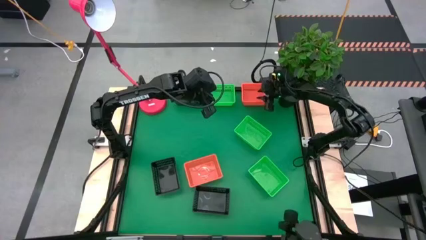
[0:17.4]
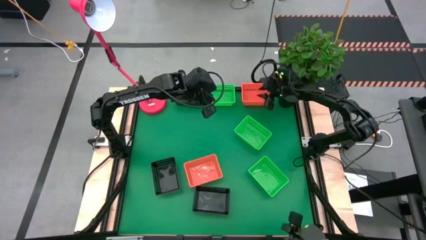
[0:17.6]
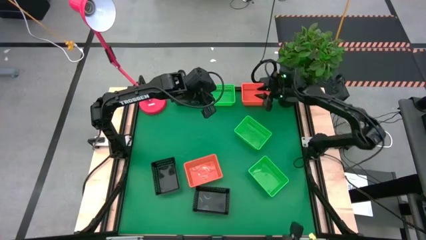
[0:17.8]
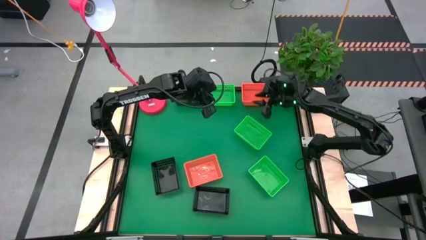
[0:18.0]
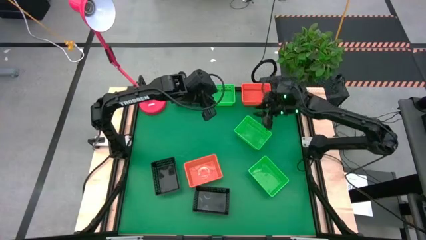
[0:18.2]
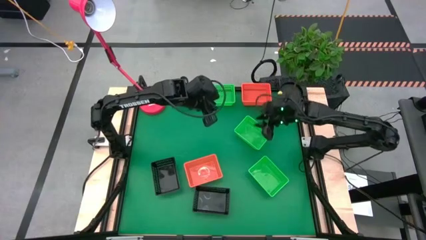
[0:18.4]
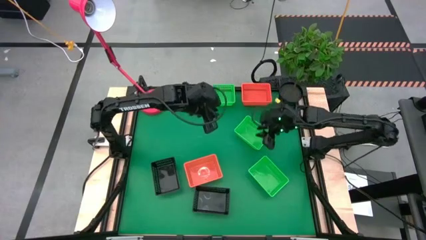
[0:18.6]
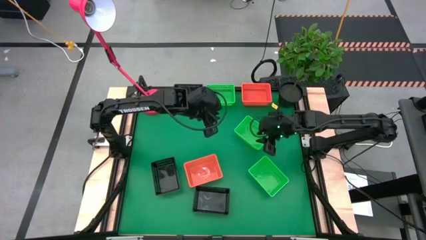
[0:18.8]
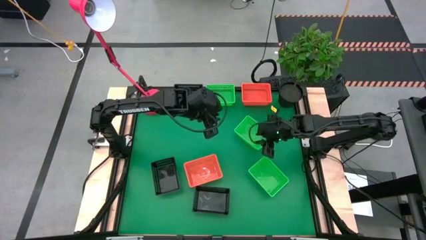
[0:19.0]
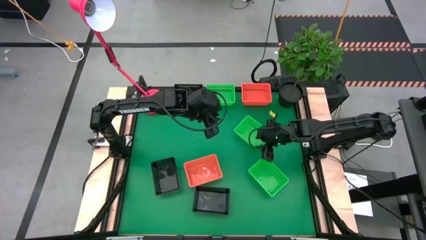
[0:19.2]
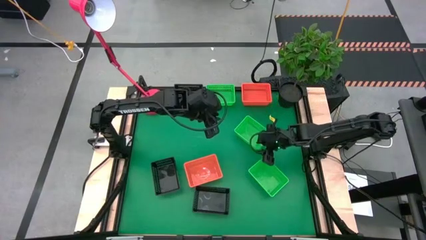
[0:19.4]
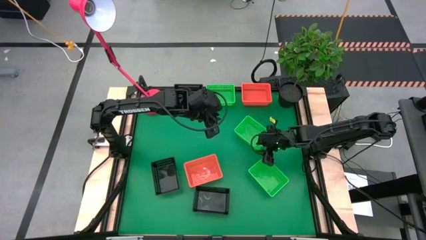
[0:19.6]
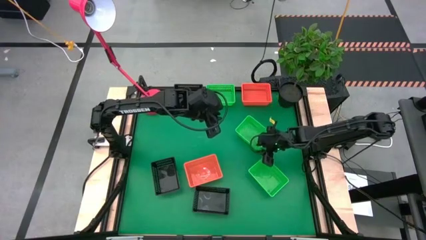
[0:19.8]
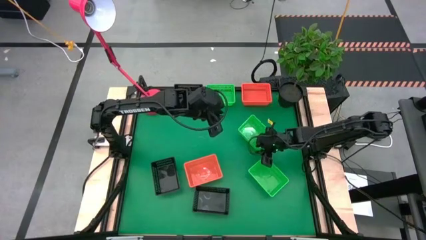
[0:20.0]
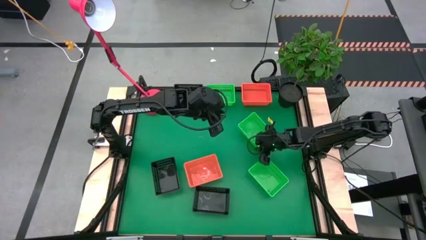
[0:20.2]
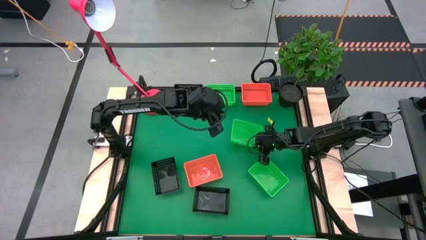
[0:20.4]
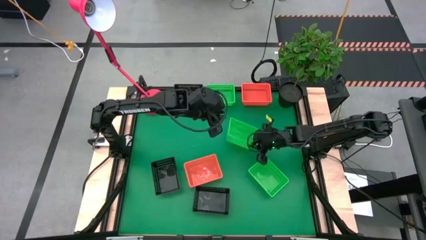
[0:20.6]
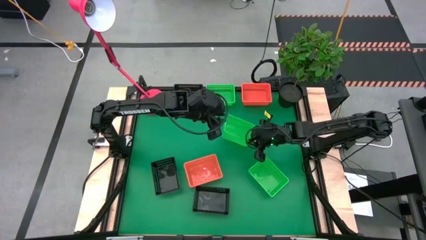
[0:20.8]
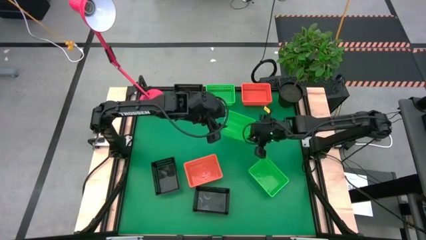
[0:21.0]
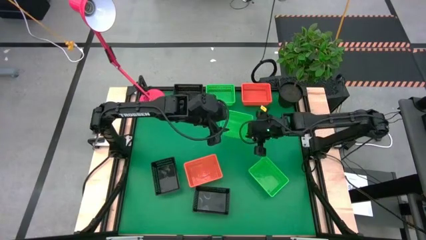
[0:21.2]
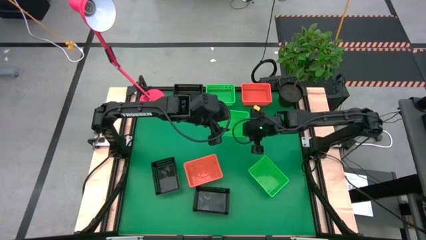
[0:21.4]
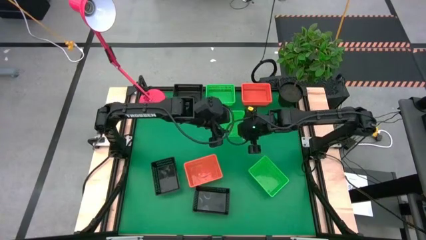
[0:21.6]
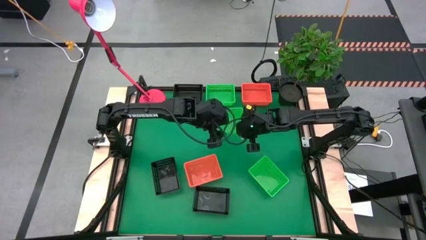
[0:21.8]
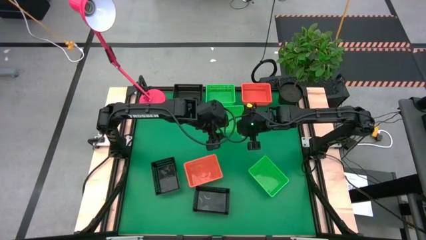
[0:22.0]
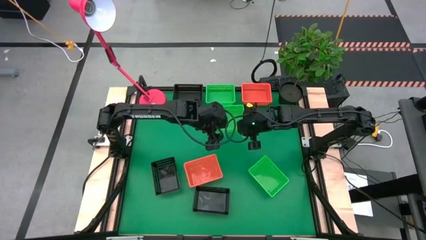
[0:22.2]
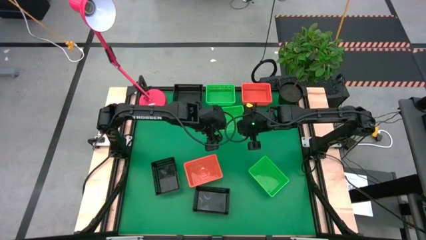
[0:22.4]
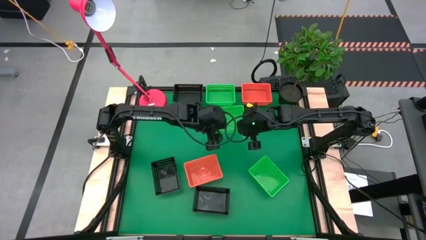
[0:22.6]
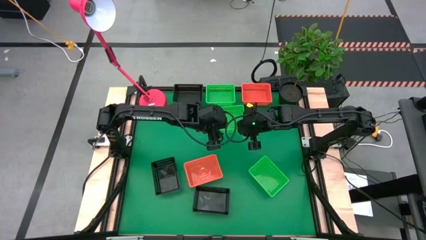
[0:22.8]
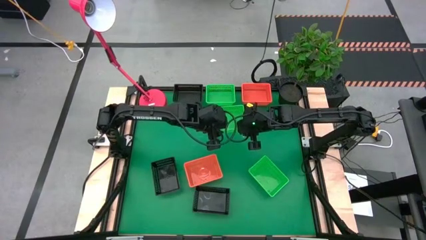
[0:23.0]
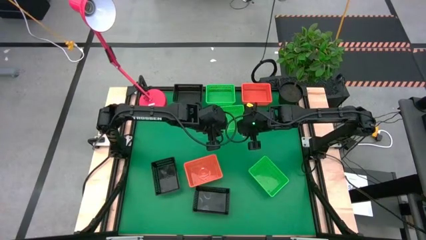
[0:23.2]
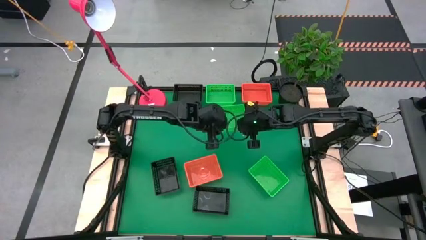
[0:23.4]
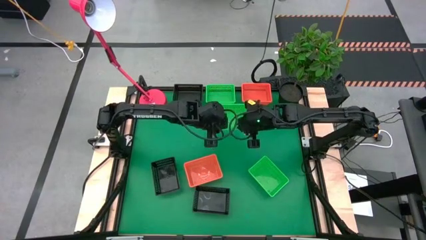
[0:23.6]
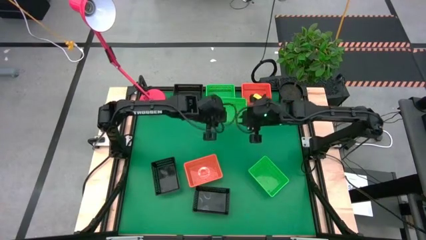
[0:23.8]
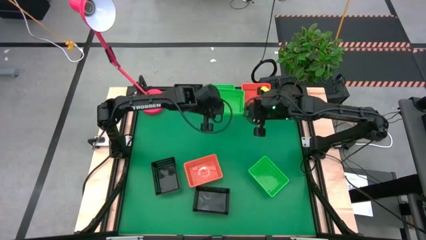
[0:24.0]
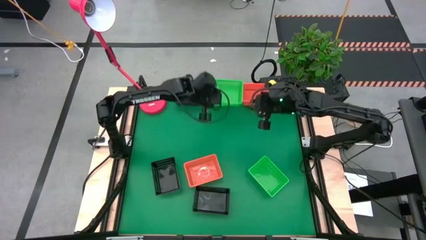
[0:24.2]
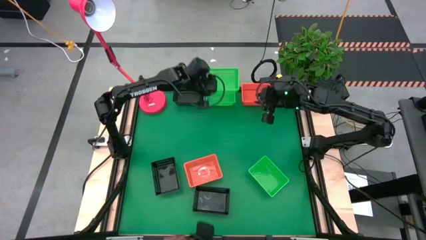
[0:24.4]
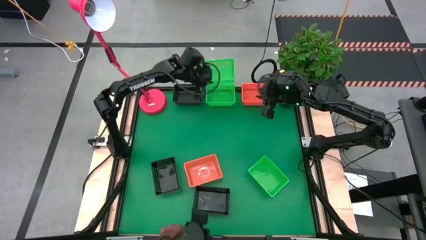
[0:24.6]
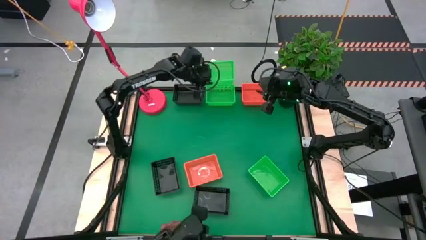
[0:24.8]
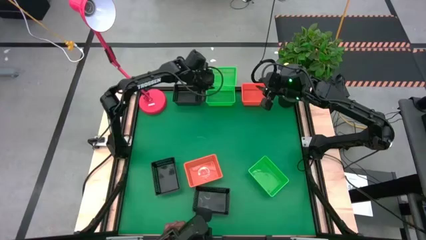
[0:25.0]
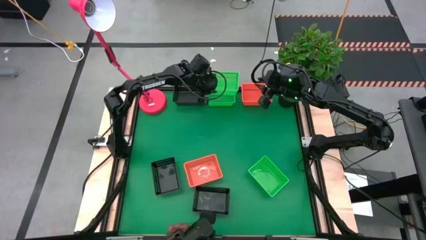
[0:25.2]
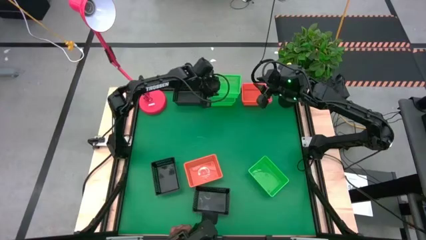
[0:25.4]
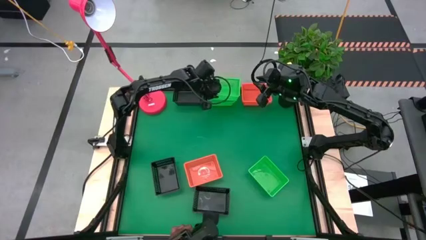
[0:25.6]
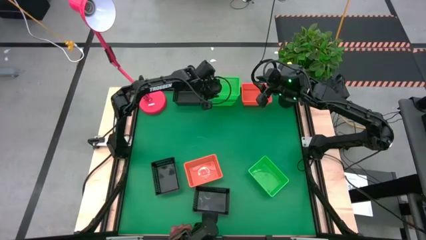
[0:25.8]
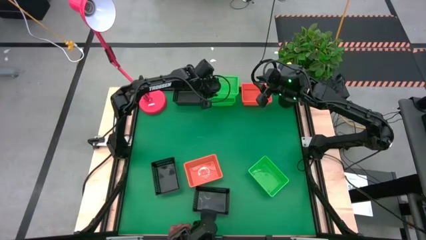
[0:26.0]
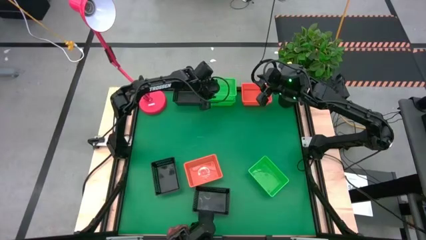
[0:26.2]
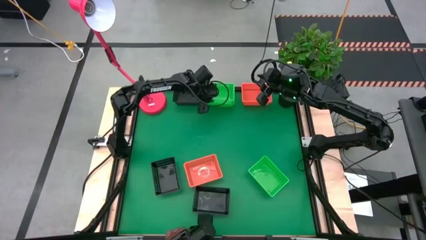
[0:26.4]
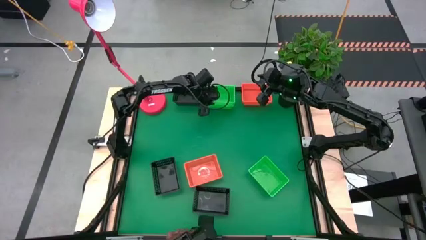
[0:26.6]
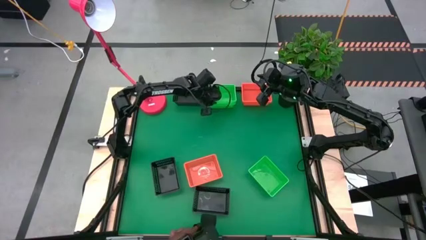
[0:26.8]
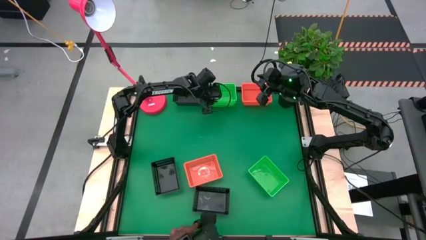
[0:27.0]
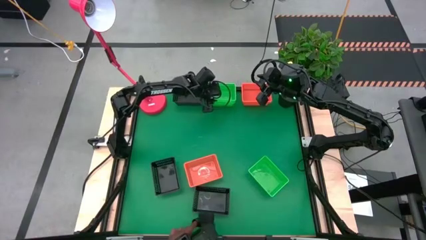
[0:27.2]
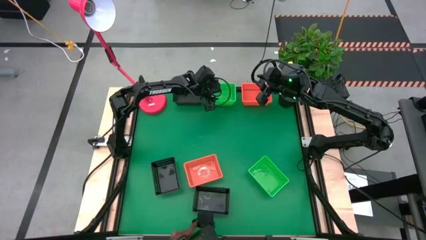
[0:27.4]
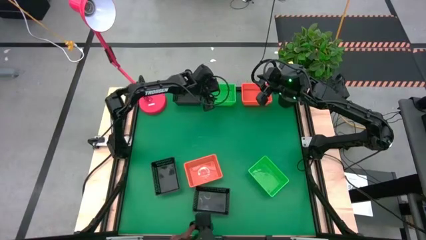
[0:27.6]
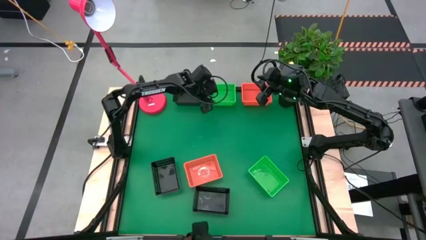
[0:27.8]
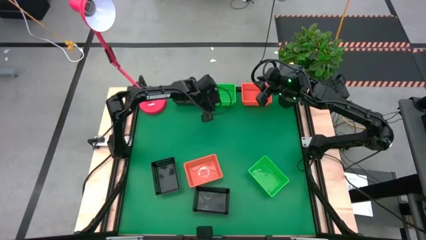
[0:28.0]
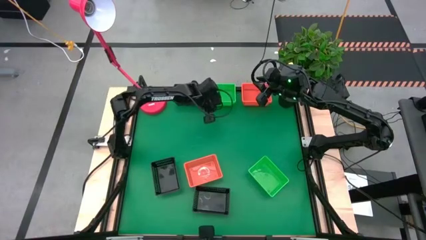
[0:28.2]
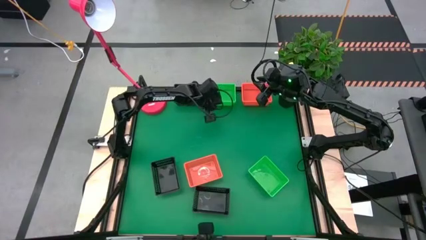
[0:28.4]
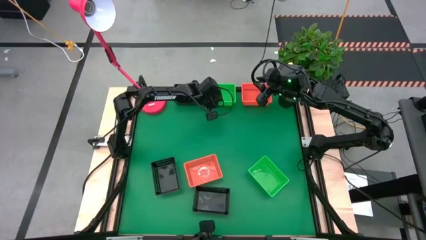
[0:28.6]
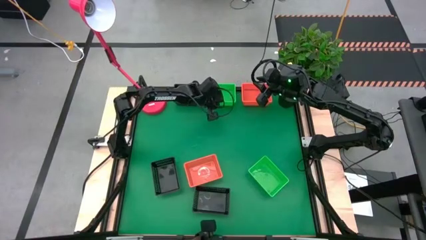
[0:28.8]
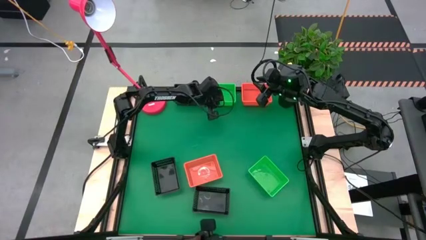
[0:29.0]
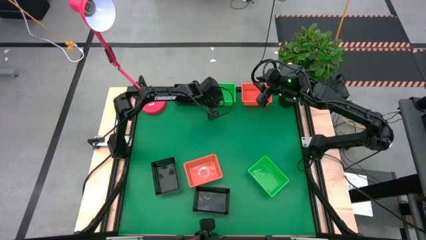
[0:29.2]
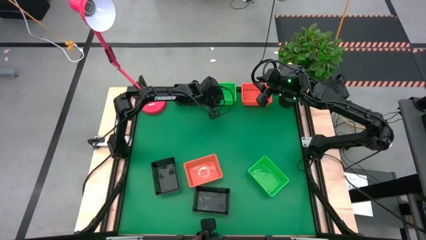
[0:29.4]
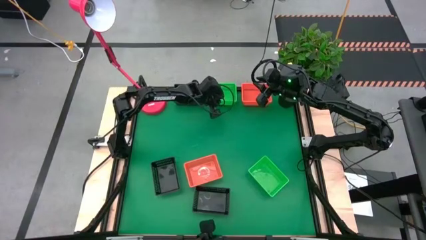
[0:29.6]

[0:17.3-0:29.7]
Stack the middle green bin on top of the top green bin

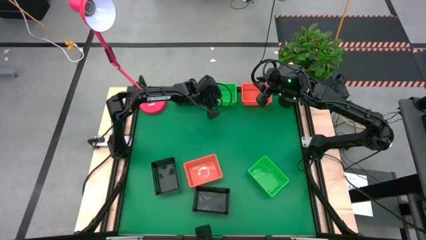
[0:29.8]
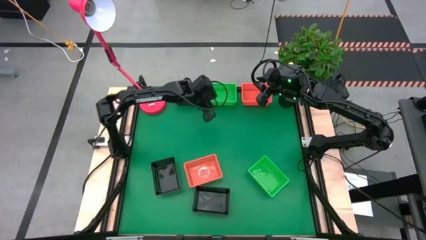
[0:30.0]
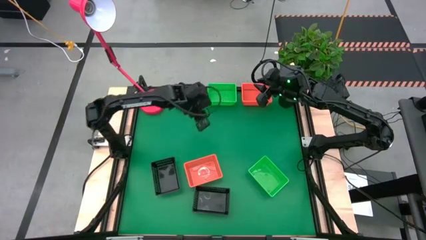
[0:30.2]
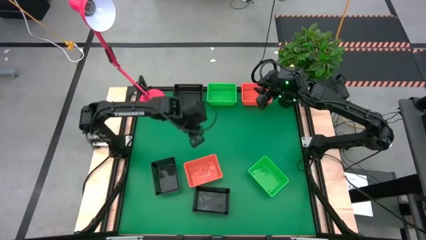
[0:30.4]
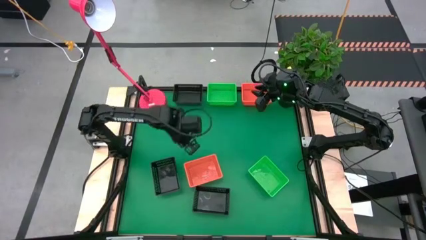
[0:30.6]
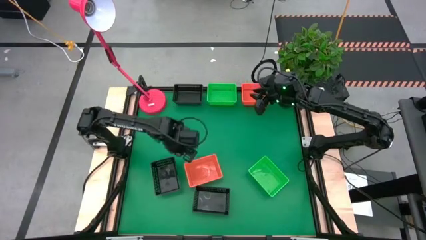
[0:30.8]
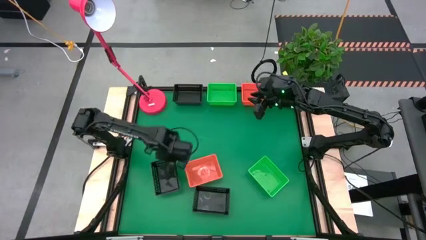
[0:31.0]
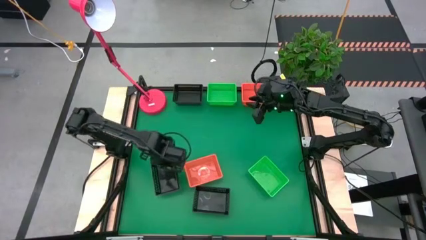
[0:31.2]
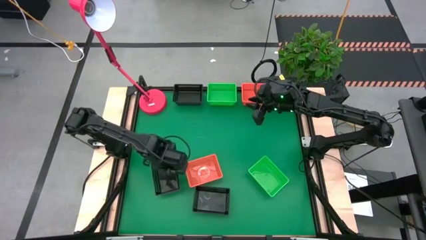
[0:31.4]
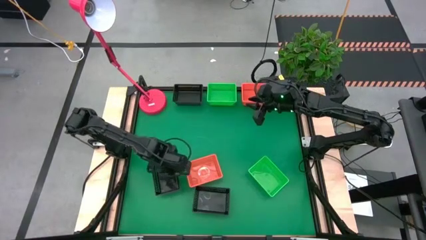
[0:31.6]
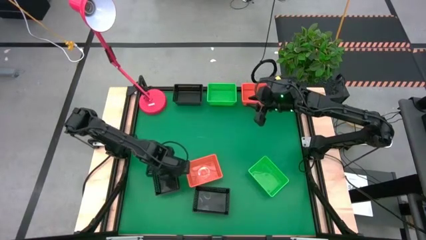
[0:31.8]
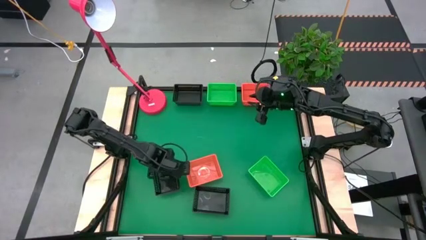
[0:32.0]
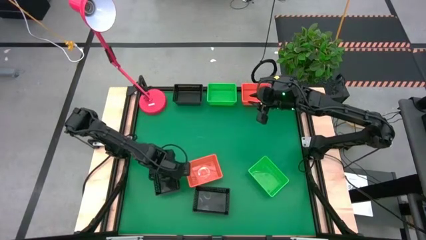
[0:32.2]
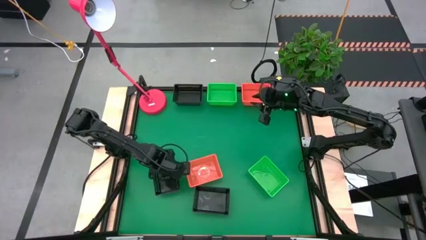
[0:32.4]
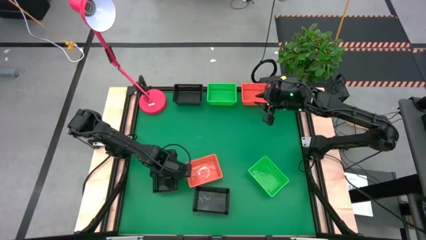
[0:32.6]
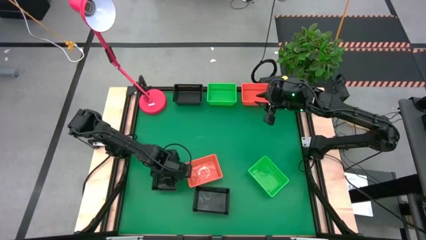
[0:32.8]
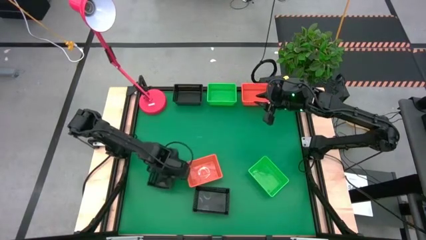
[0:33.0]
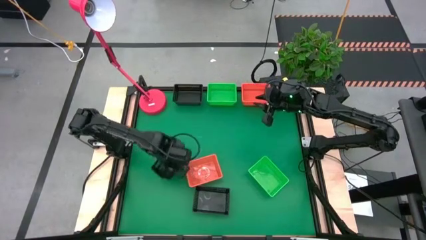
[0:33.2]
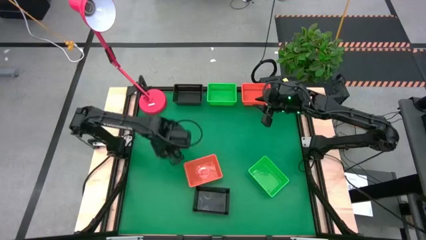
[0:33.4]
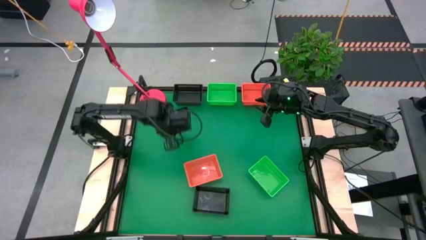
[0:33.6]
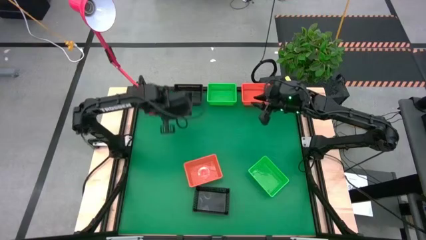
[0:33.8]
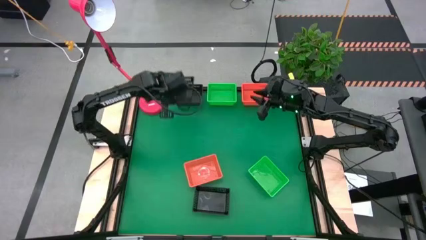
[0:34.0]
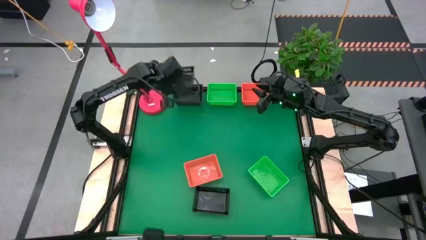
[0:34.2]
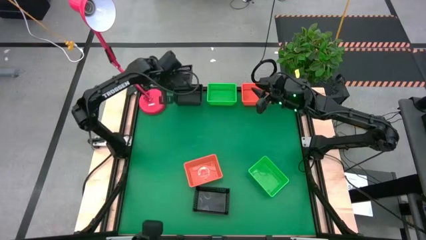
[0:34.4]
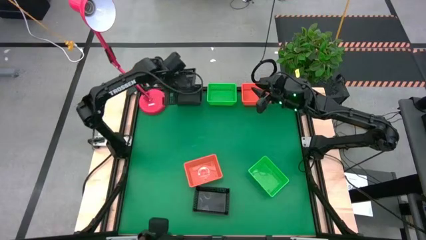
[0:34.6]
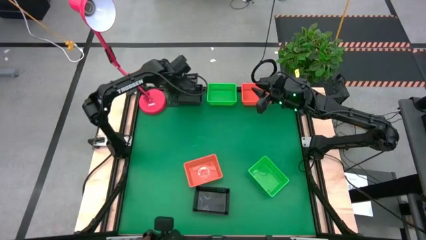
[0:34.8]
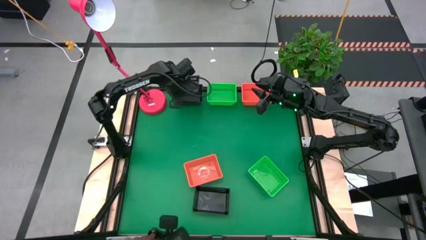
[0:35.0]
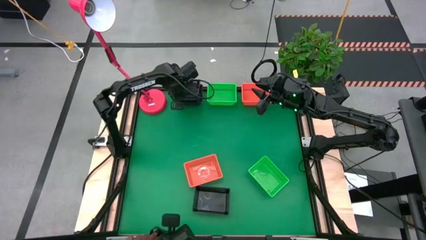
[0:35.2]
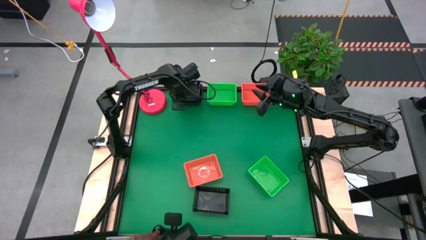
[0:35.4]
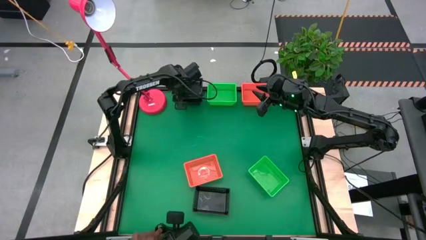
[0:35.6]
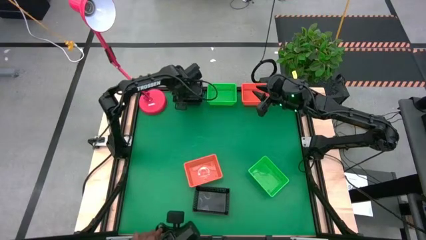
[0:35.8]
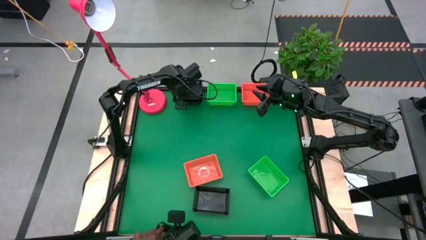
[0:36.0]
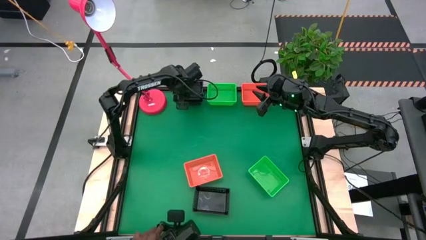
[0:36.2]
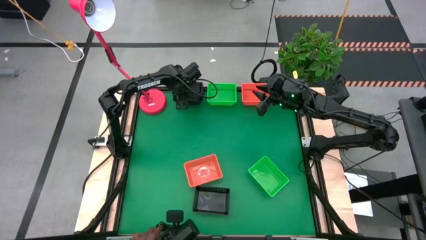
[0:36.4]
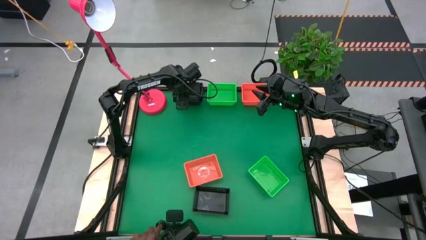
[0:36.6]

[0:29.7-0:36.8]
Stack the middle left black bin on top of the top black bin
